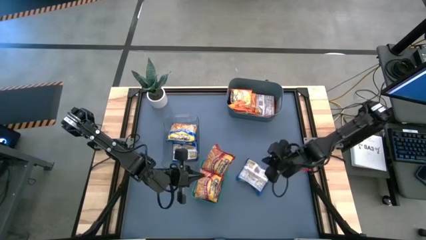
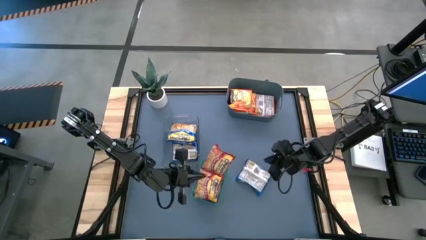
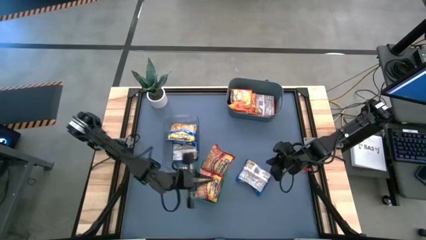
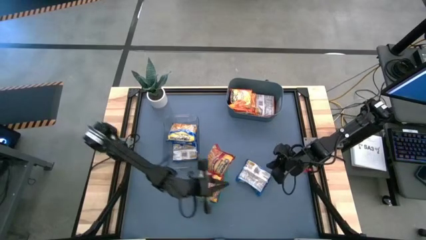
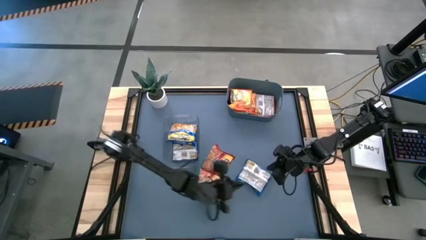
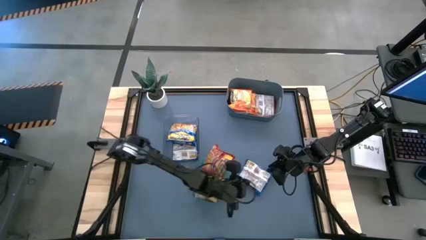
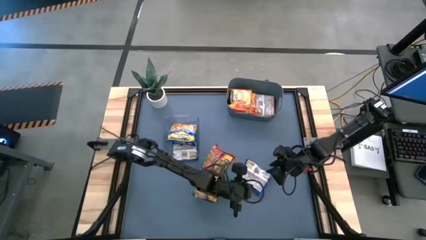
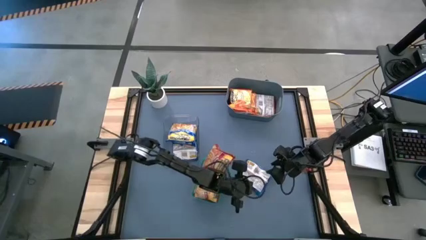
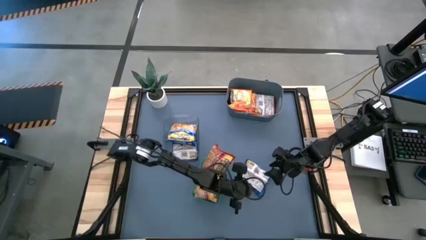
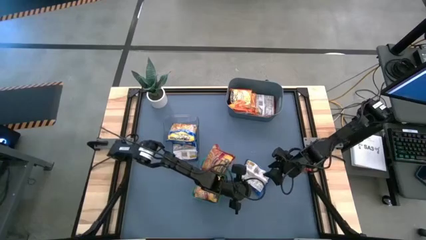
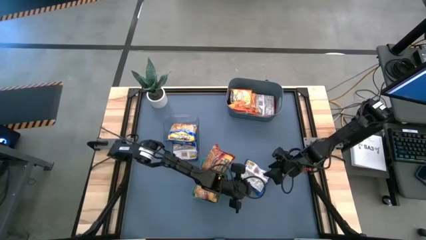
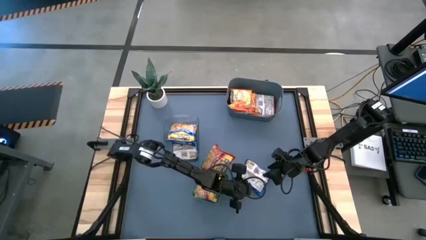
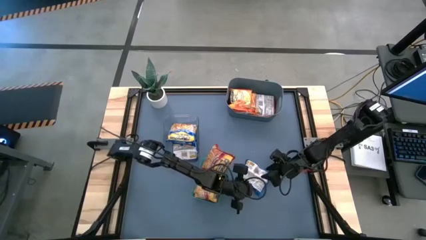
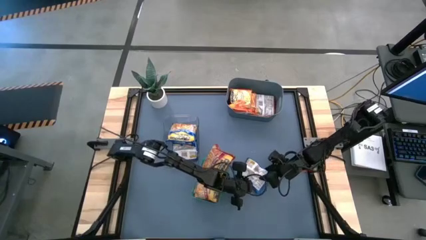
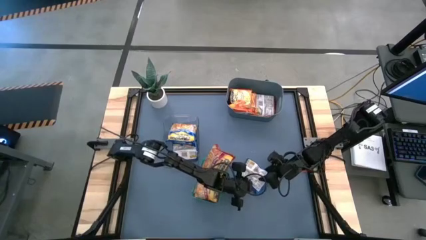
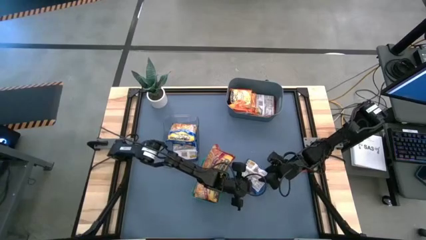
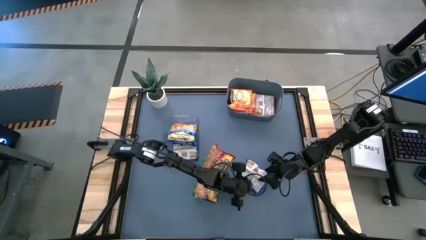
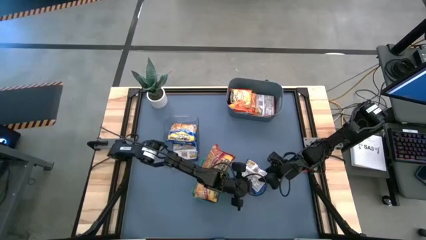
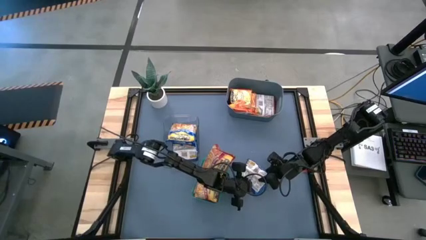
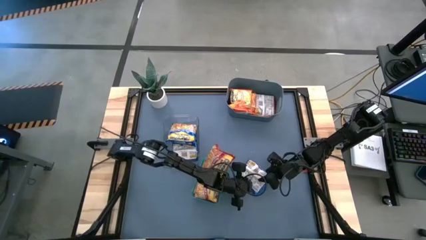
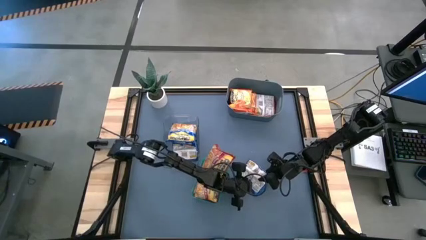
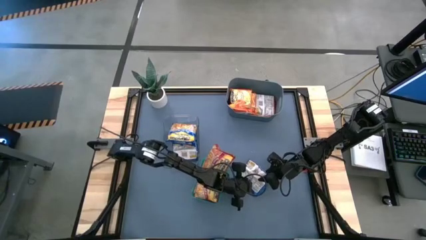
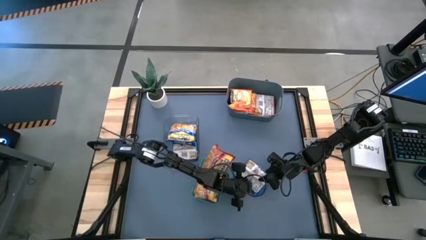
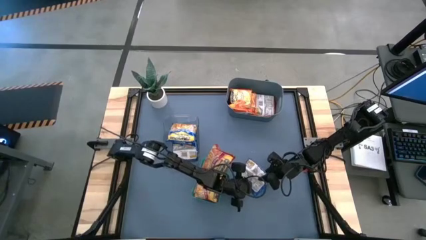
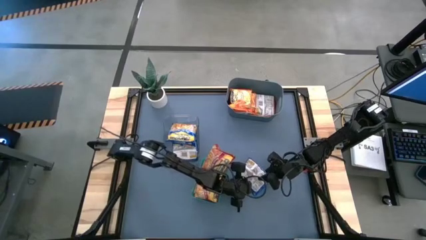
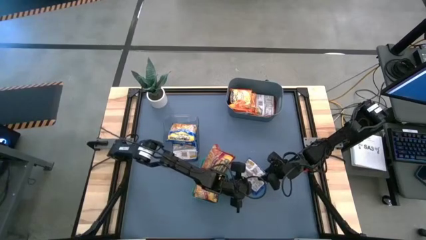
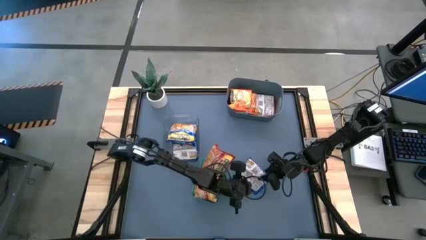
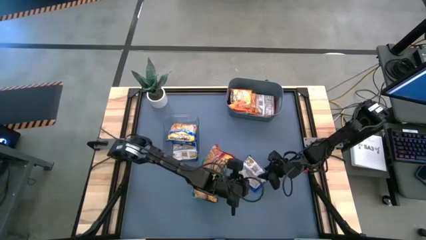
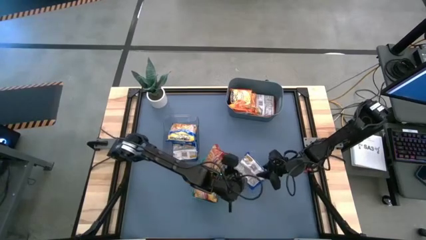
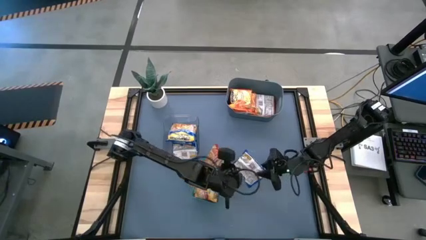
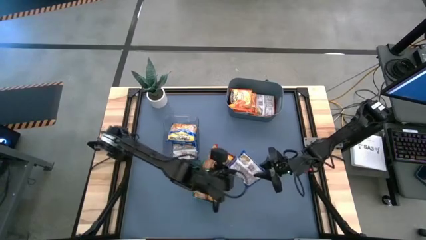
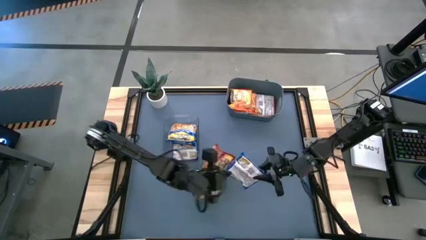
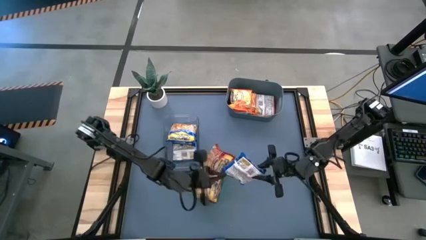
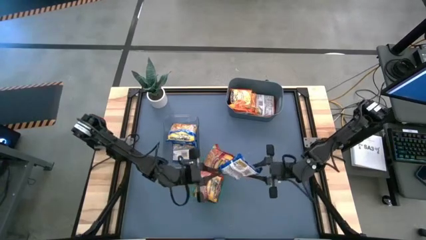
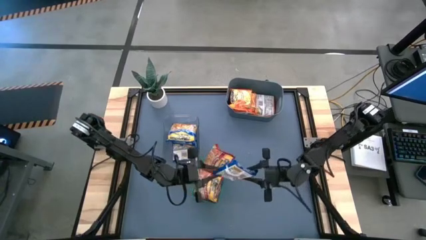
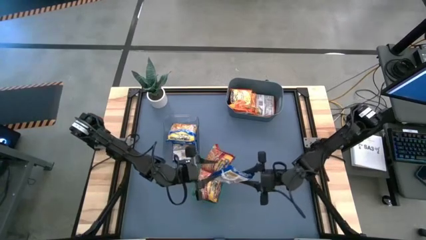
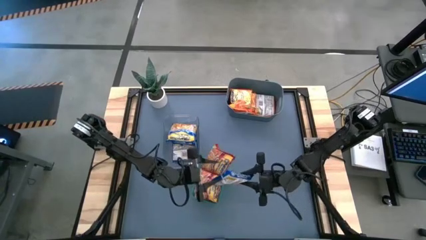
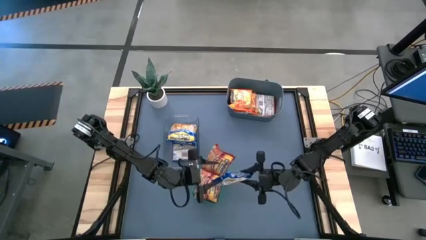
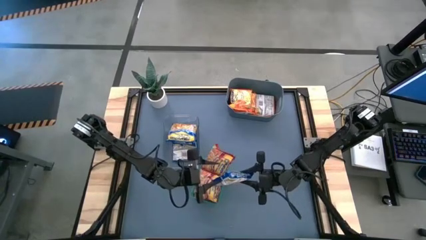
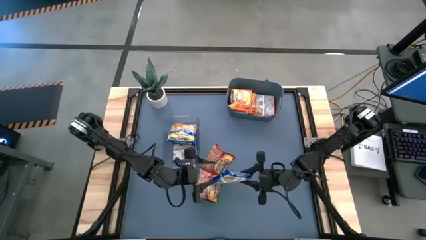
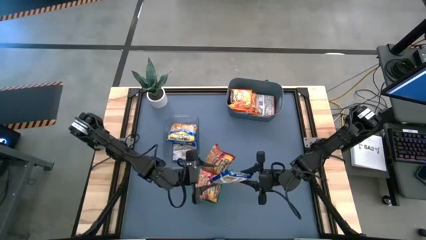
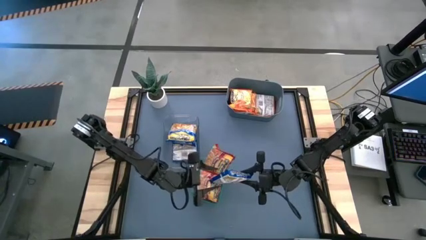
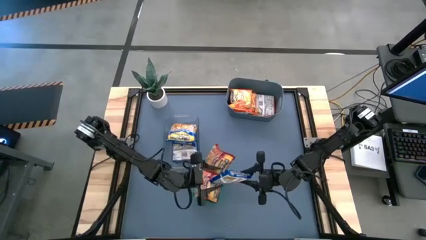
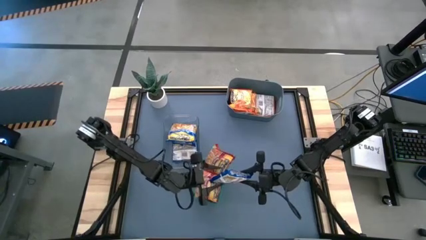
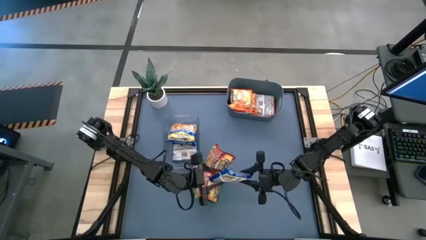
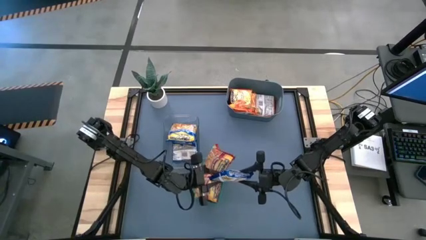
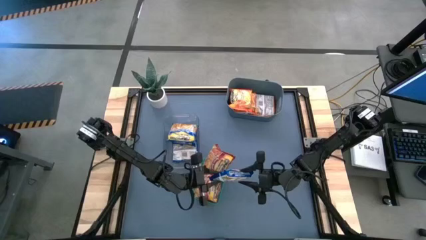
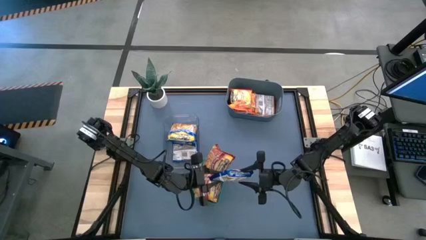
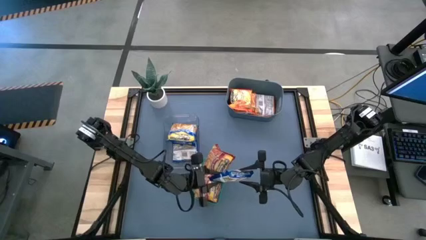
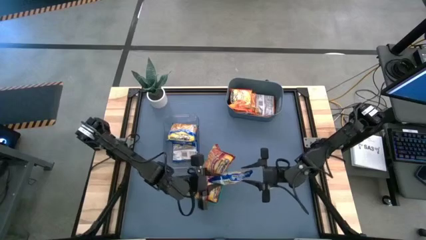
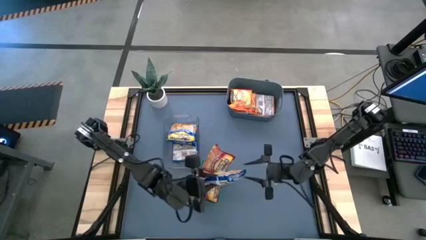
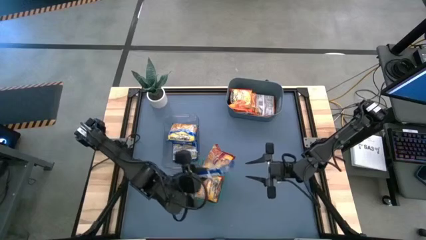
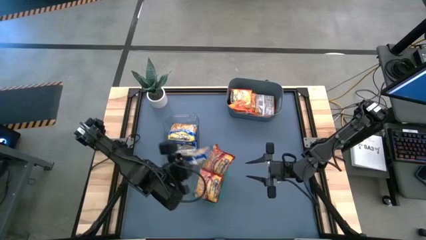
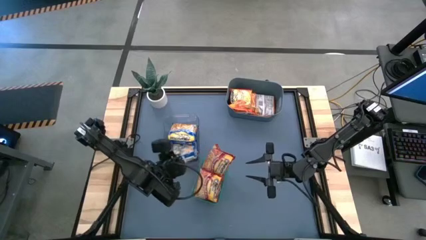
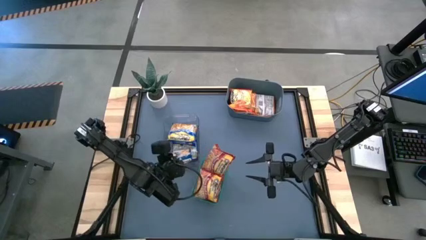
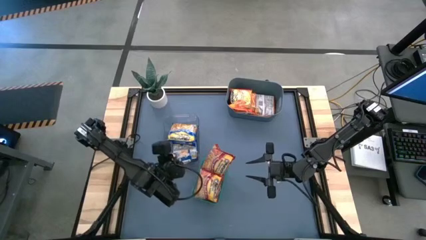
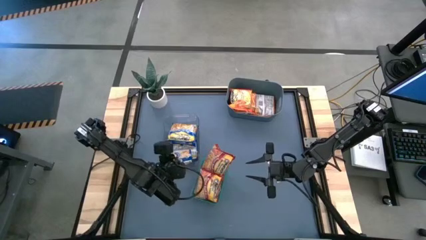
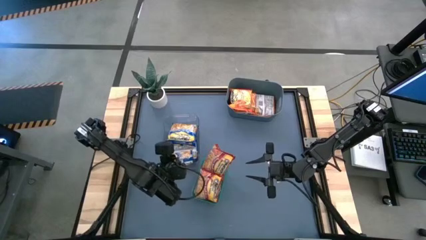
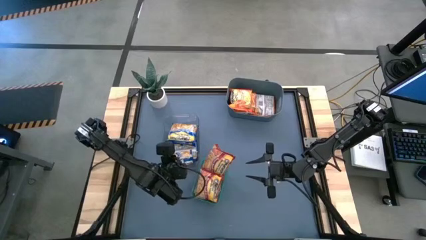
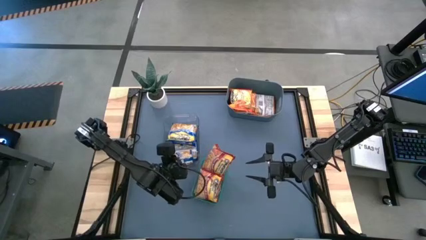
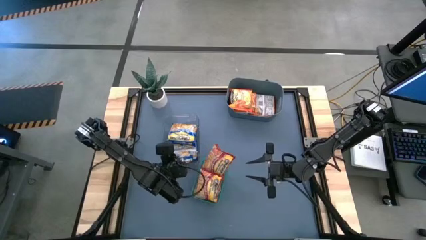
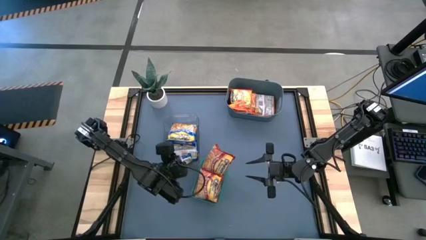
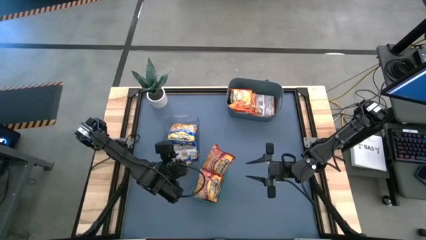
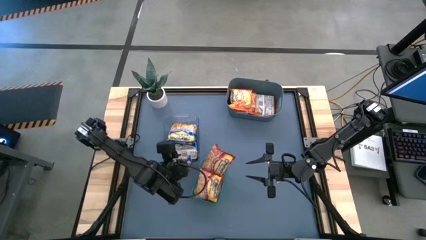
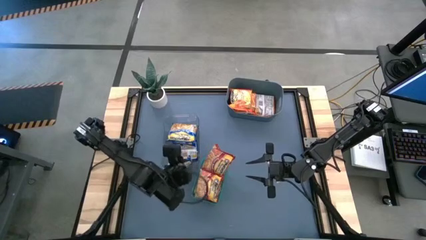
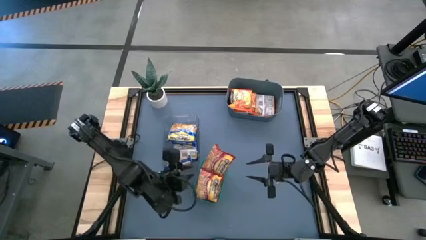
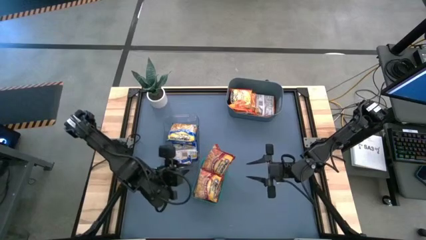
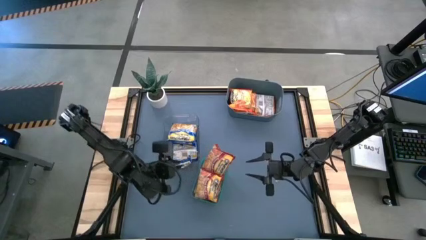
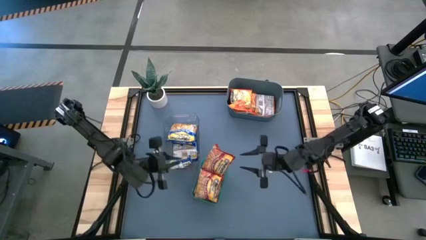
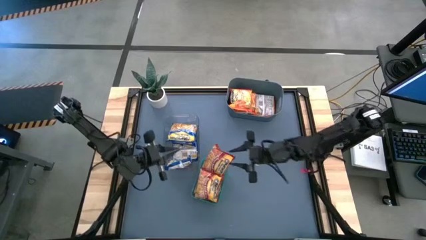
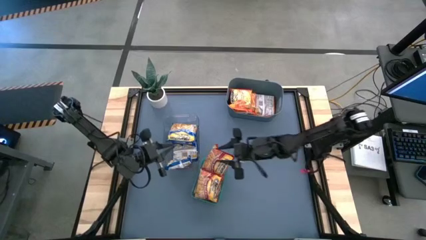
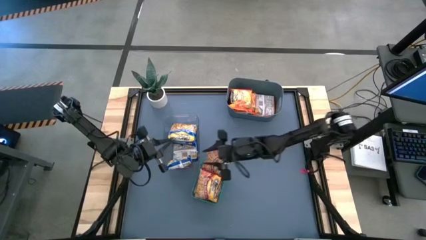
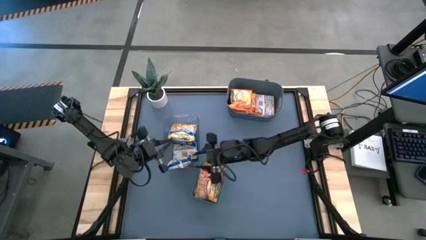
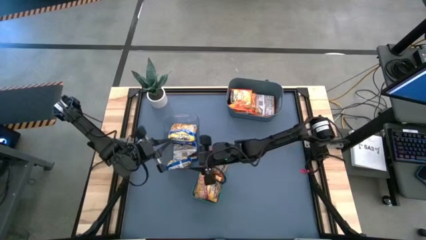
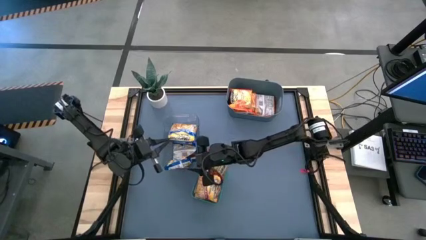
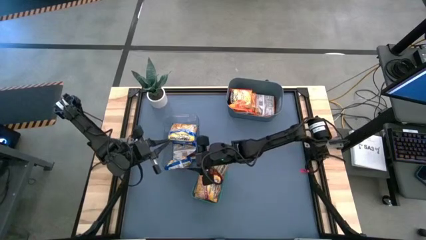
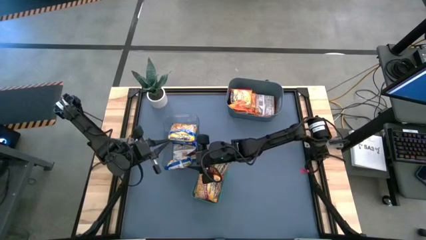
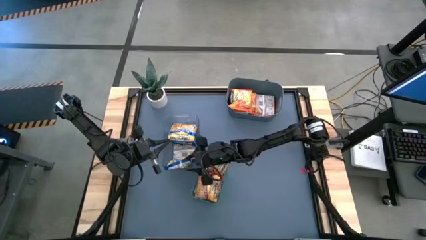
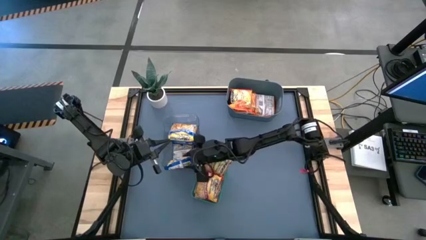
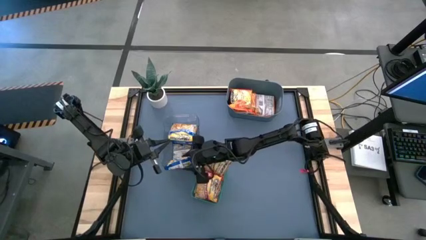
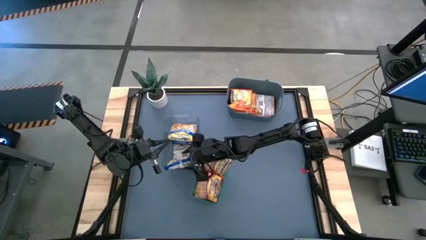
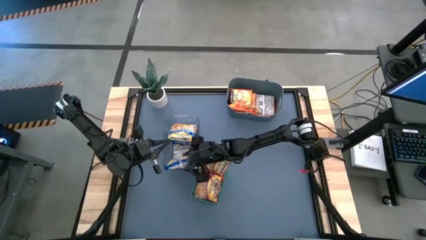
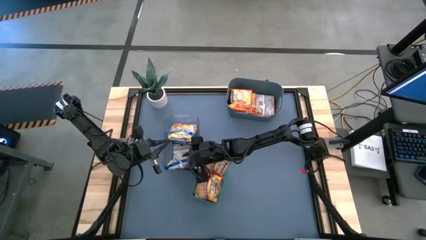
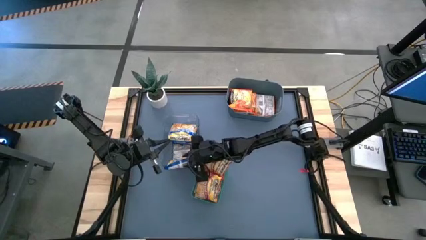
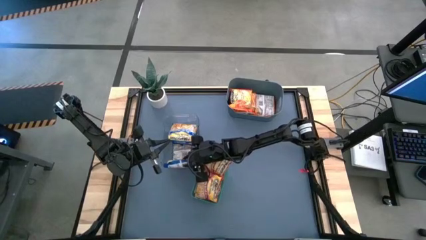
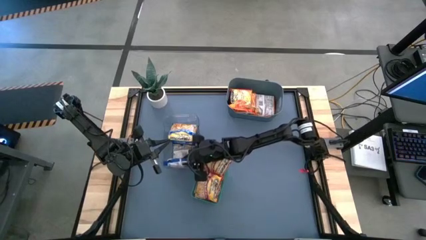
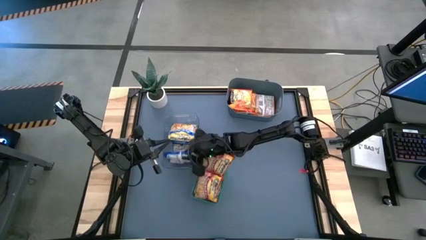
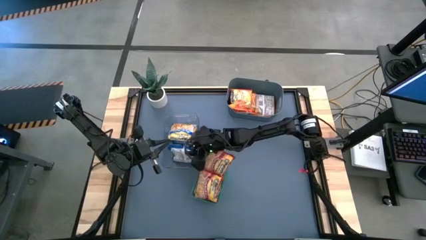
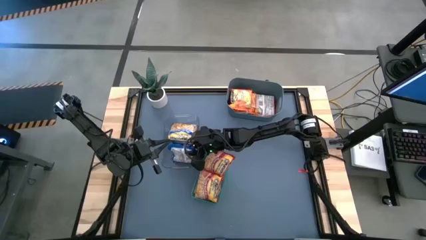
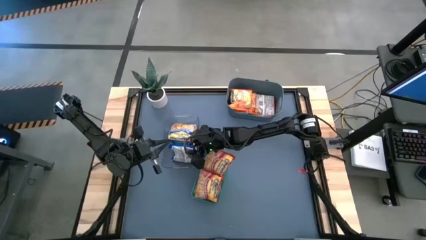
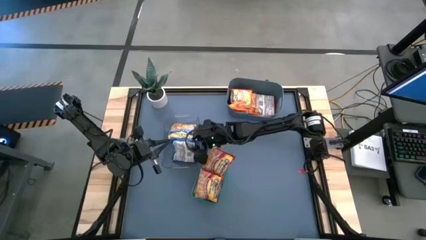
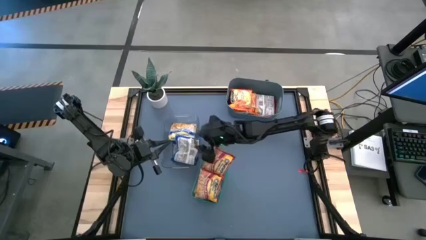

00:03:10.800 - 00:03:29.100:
Task: Sort Maruchan noodles
Put the blue noodle pack into the transparent bin
